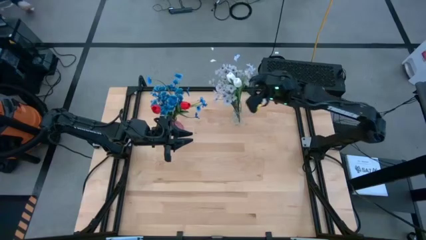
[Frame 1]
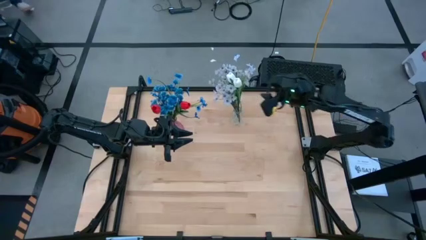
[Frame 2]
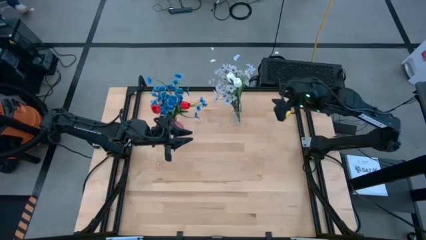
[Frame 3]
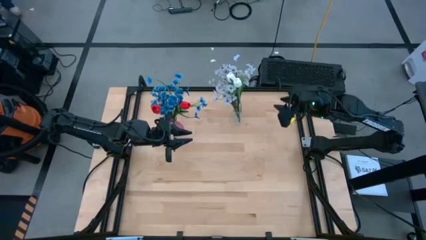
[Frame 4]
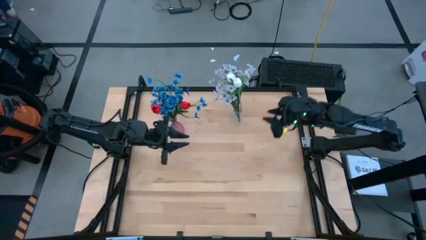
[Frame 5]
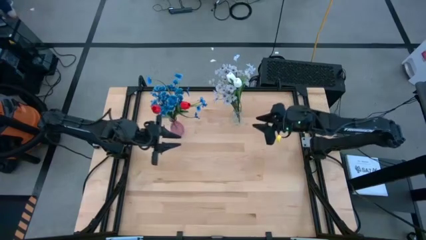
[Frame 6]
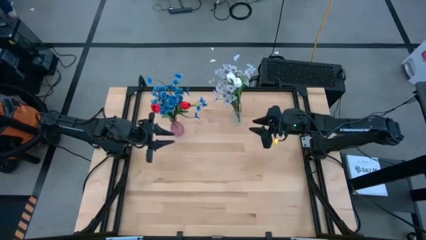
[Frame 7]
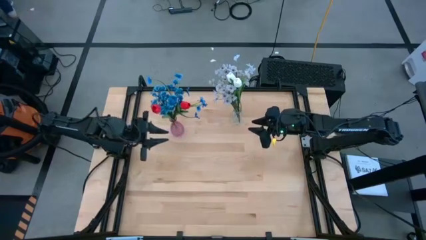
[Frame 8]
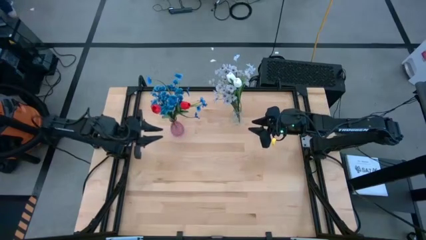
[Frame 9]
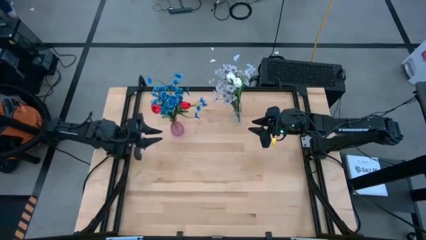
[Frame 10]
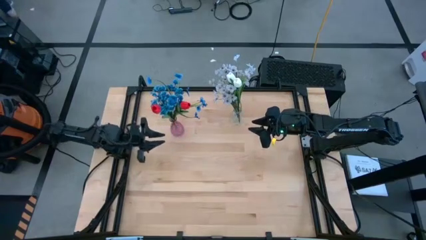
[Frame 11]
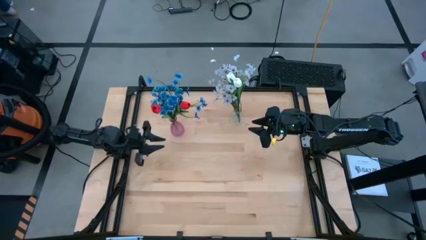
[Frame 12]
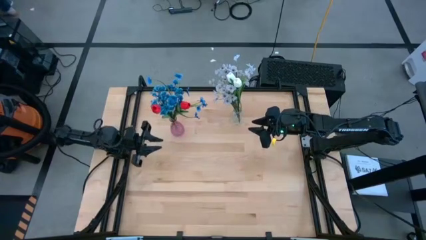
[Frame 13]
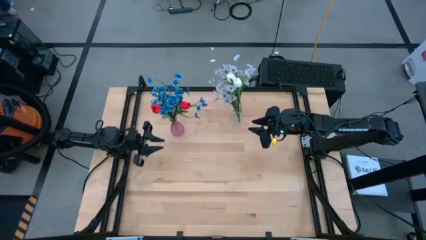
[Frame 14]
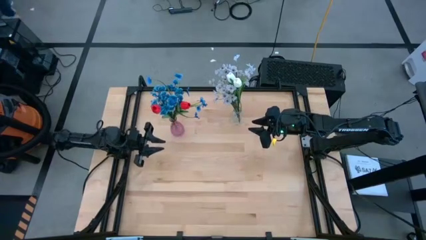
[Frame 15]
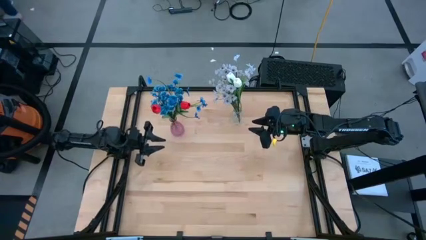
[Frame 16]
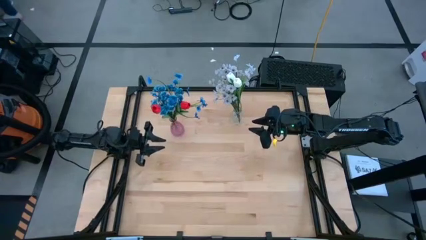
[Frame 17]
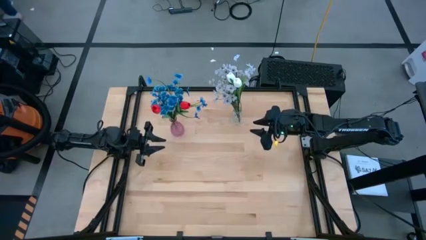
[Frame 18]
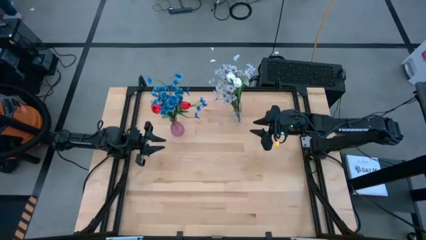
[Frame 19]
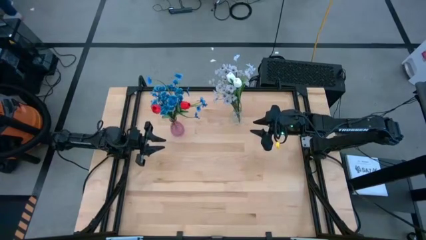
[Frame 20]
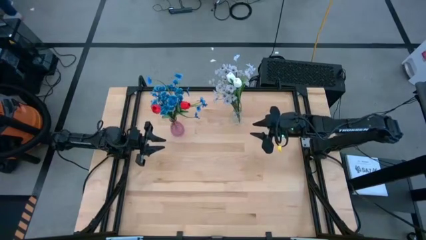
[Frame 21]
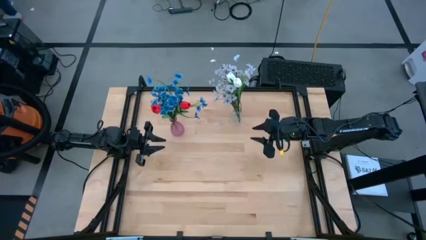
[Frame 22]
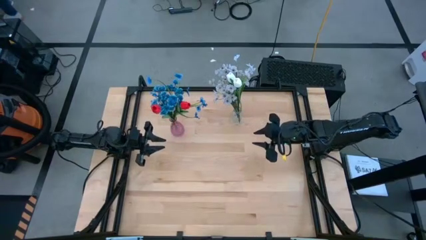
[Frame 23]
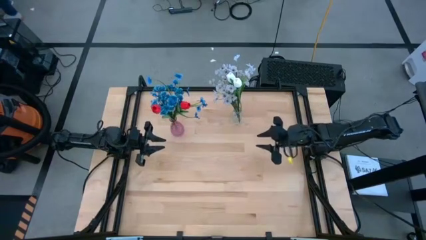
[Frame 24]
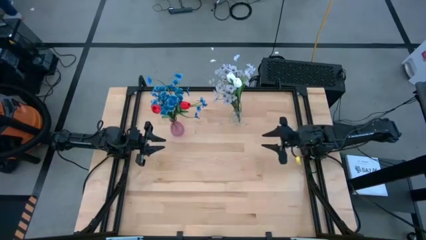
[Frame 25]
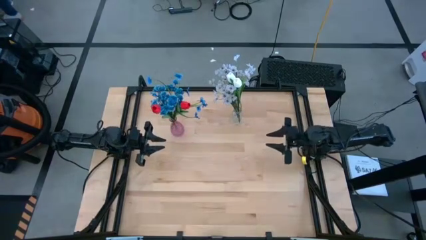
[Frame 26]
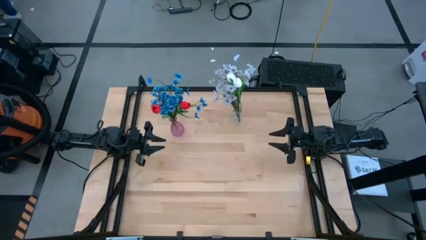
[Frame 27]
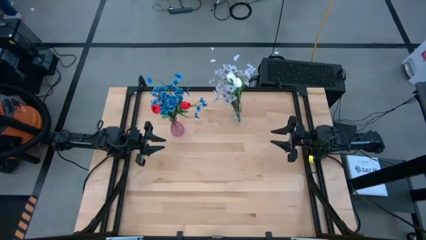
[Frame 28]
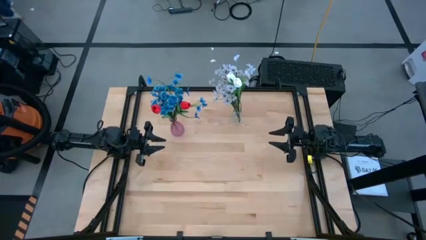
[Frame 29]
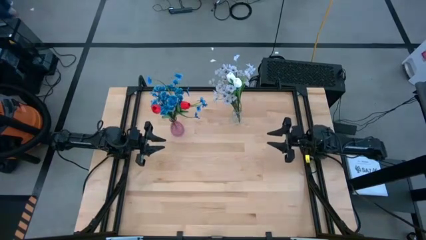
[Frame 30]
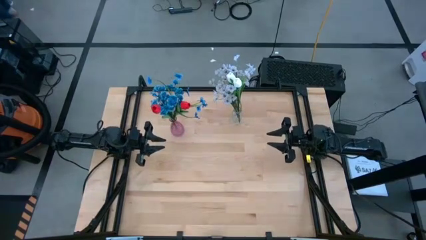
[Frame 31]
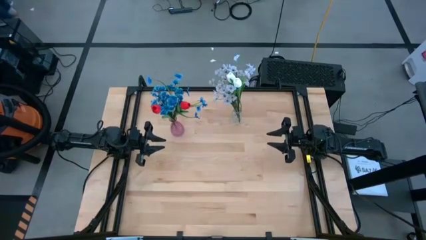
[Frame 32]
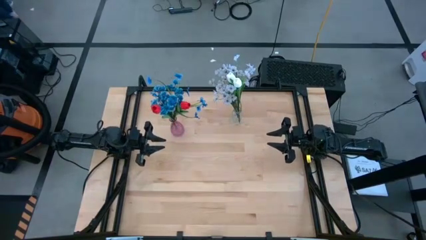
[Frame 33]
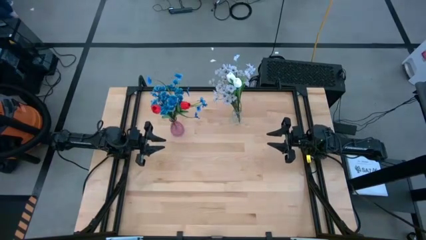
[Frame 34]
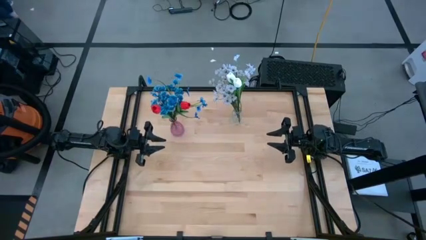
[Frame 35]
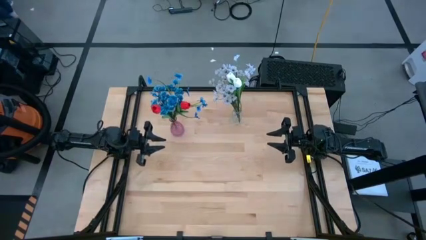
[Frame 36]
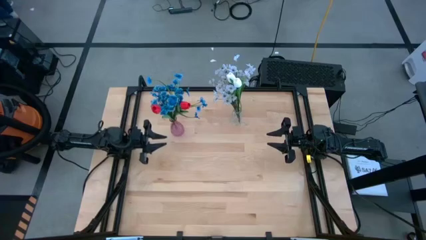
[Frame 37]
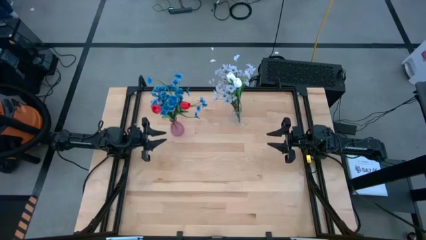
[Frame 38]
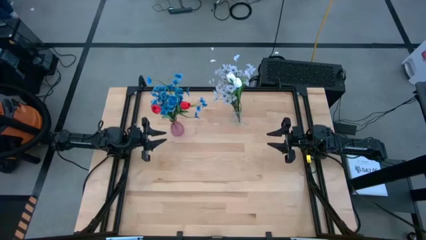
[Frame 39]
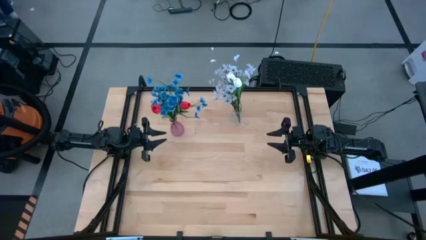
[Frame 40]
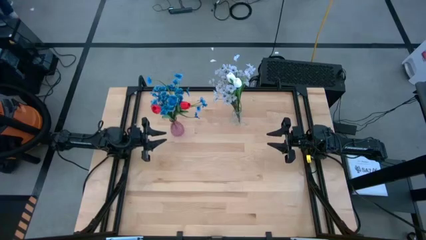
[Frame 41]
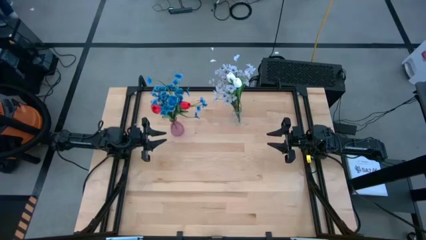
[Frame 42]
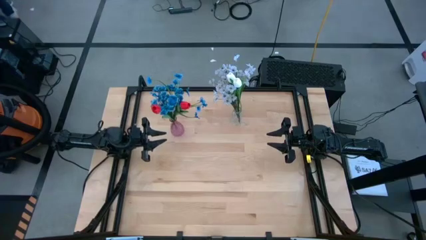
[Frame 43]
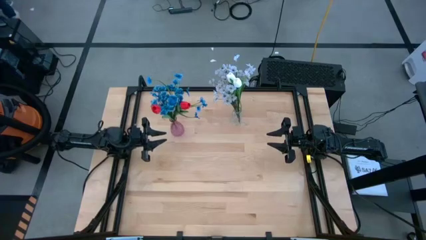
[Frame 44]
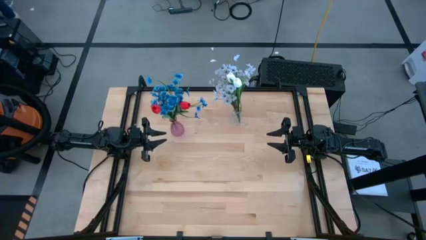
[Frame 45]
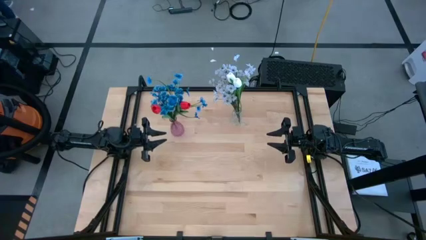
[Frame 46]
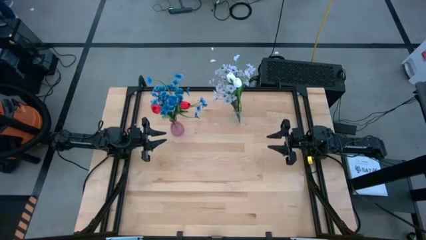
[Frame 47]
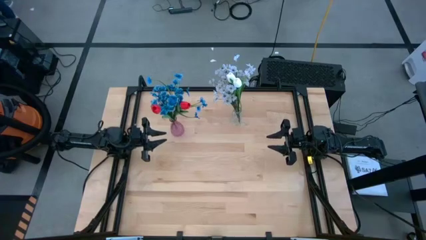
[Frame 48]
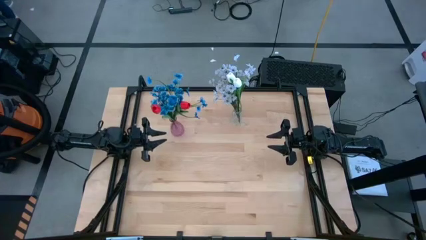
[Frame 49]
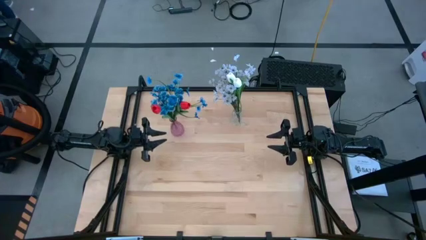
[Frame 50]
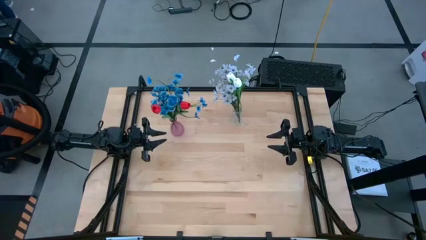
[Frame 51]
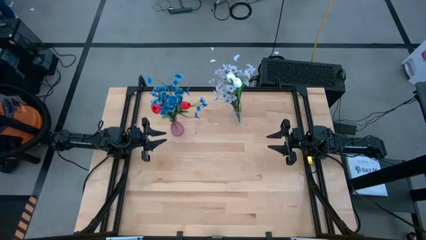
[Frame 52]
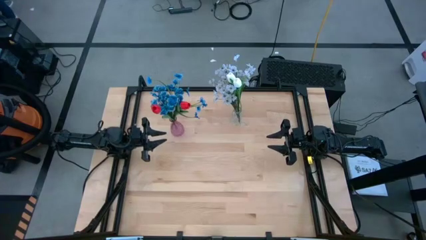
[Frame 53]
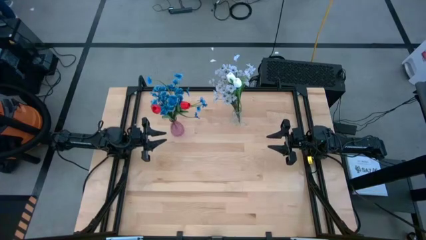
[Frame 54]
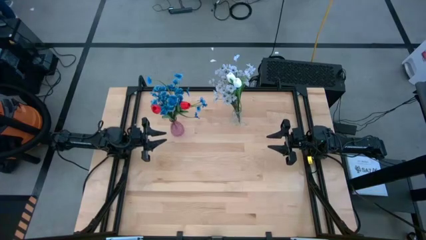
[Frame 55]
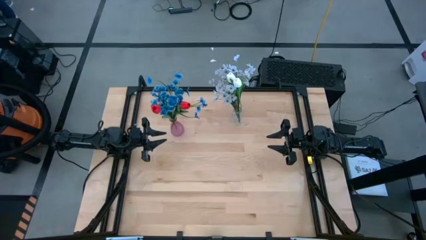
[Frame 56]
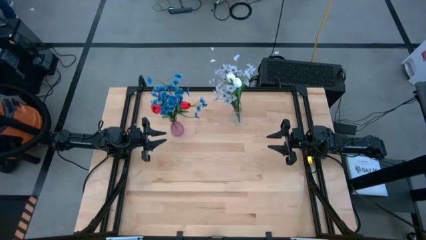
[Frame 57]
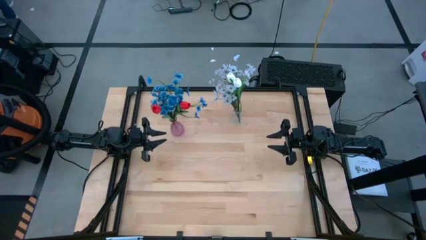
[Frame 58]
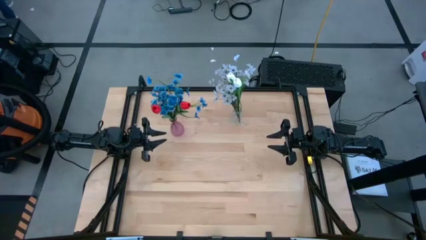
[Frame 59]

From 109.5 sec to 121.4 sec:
Task: Sort flowers into vase by color
Return to Home Position
